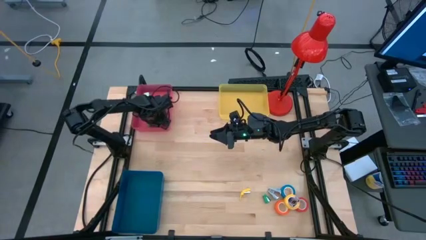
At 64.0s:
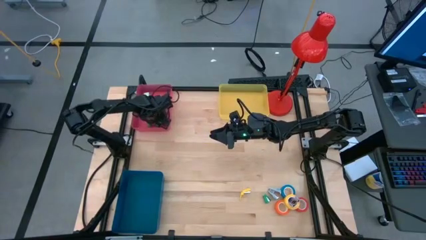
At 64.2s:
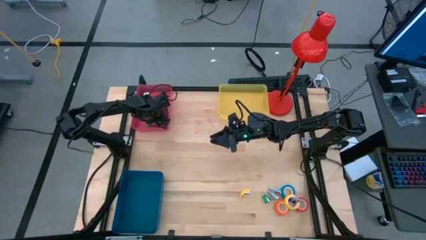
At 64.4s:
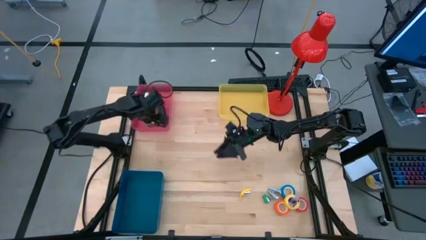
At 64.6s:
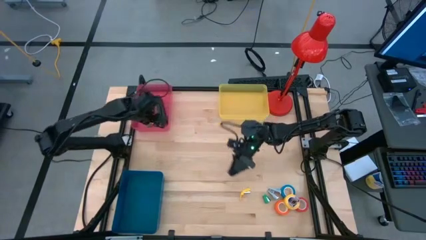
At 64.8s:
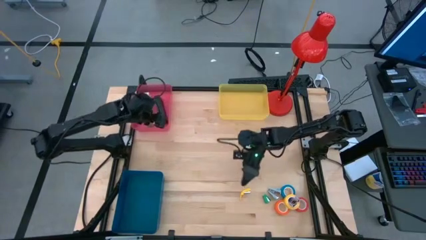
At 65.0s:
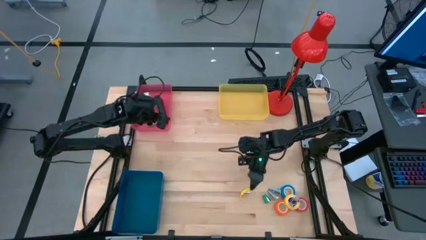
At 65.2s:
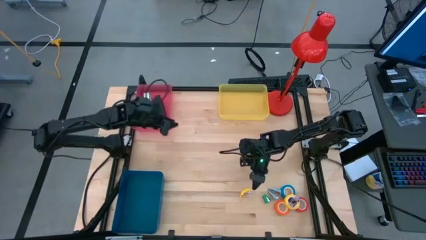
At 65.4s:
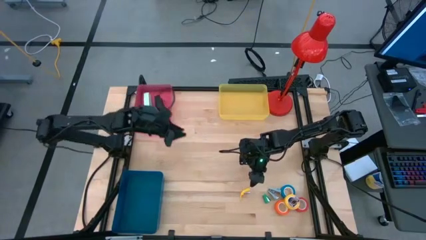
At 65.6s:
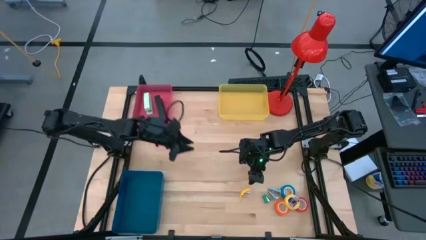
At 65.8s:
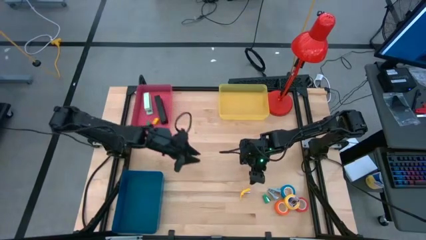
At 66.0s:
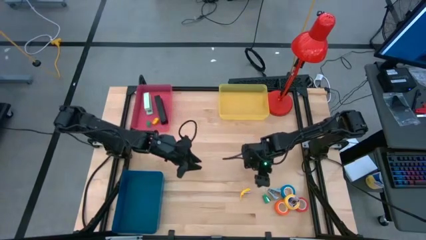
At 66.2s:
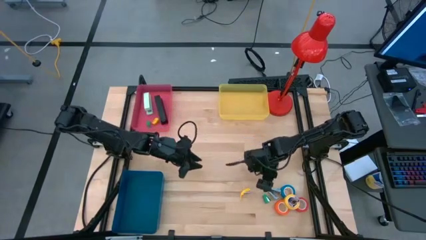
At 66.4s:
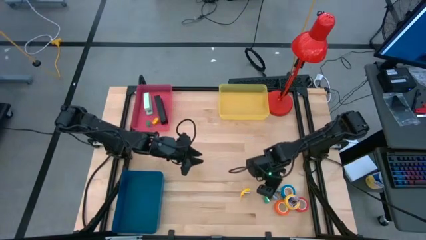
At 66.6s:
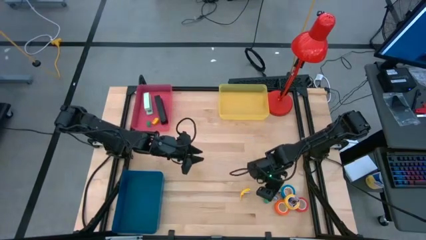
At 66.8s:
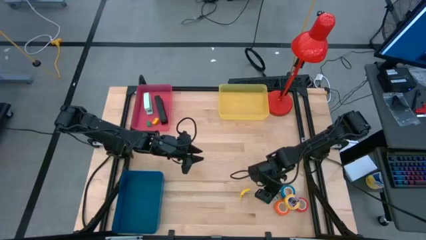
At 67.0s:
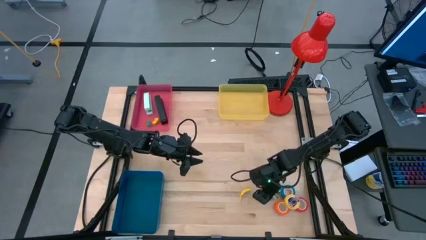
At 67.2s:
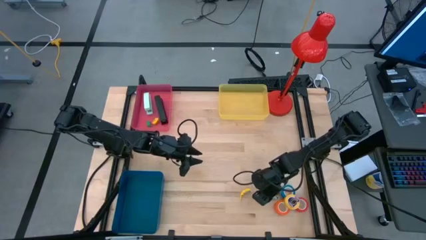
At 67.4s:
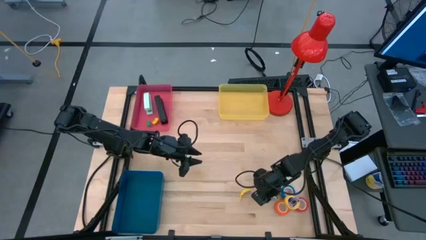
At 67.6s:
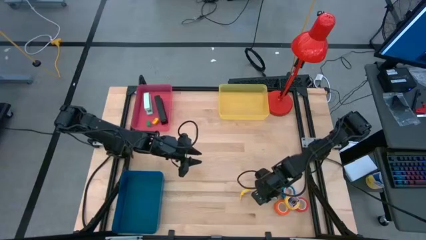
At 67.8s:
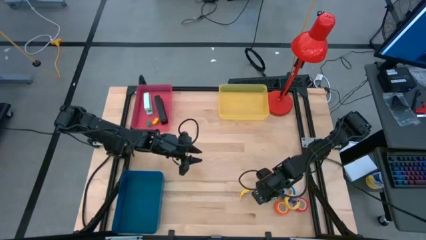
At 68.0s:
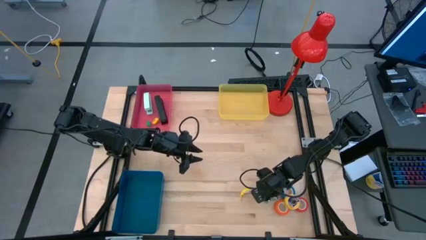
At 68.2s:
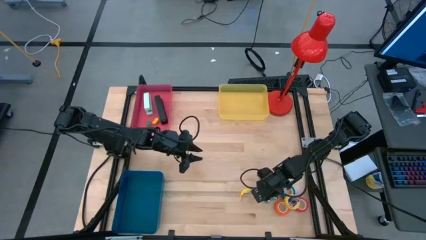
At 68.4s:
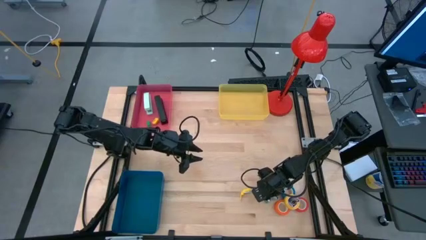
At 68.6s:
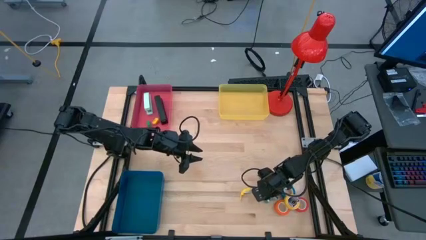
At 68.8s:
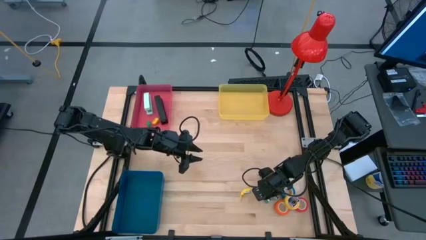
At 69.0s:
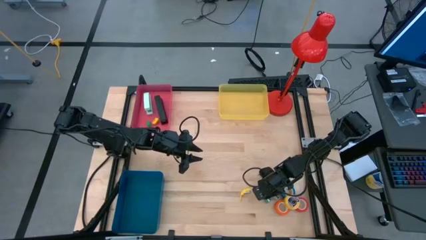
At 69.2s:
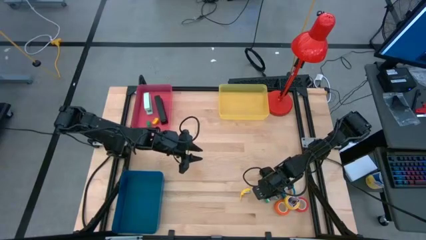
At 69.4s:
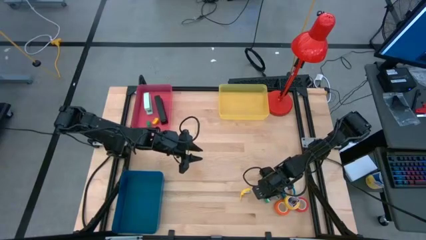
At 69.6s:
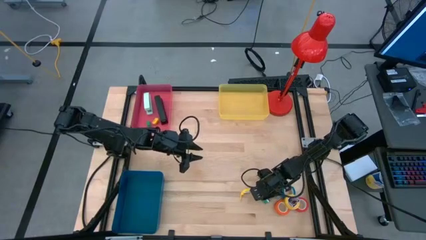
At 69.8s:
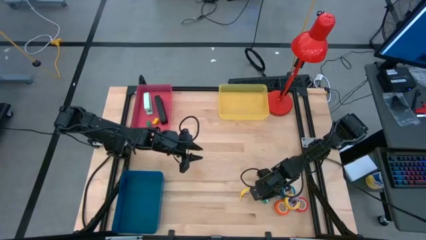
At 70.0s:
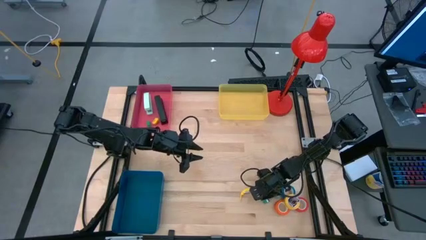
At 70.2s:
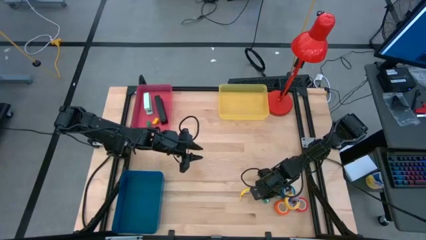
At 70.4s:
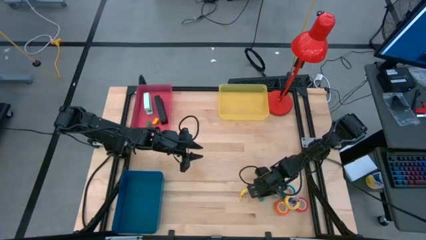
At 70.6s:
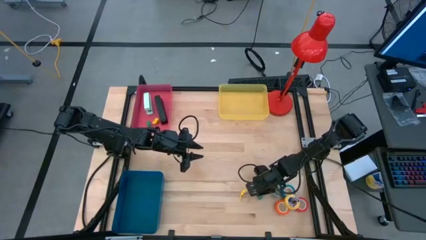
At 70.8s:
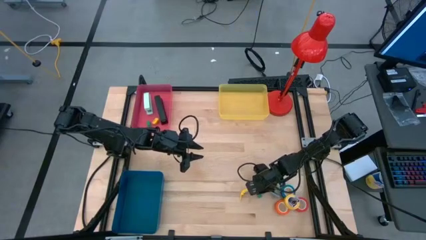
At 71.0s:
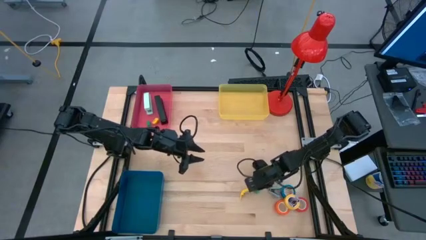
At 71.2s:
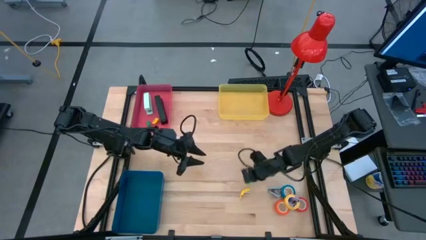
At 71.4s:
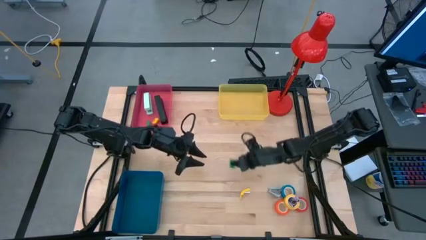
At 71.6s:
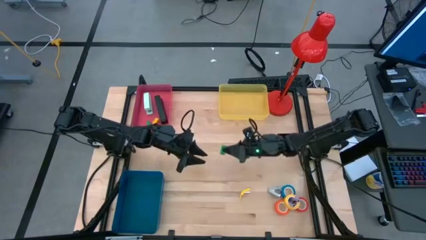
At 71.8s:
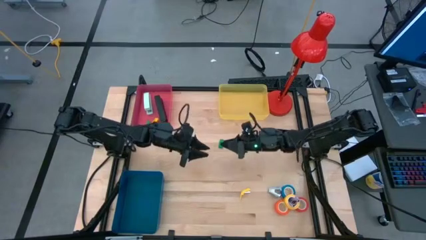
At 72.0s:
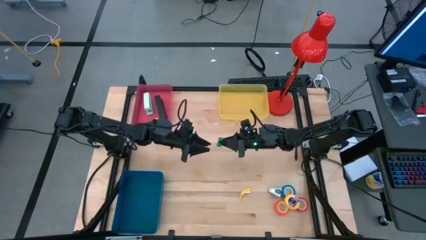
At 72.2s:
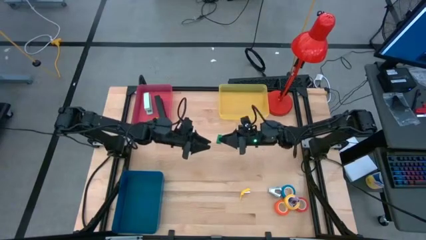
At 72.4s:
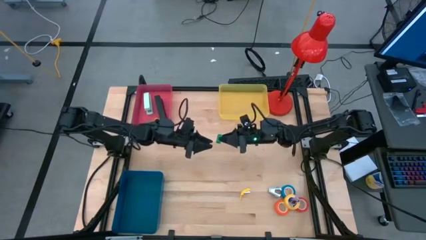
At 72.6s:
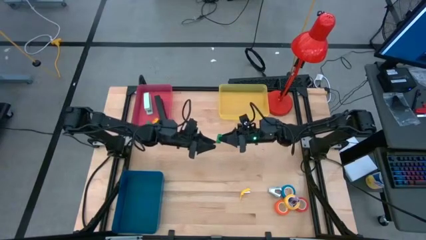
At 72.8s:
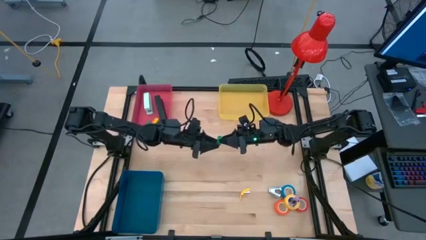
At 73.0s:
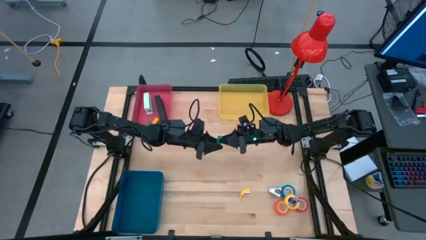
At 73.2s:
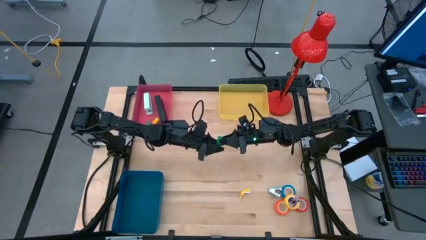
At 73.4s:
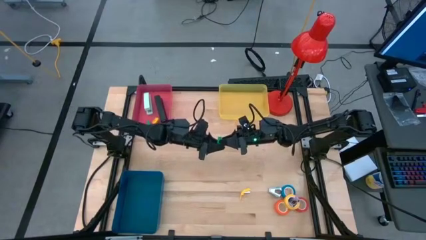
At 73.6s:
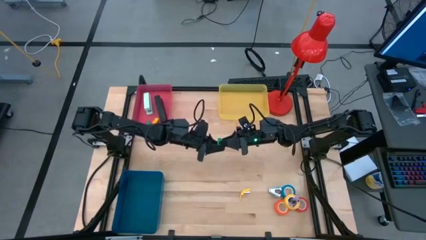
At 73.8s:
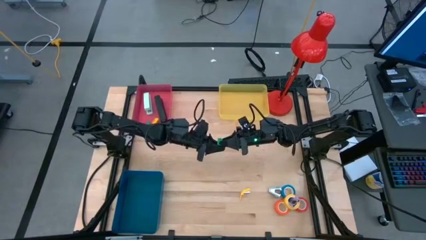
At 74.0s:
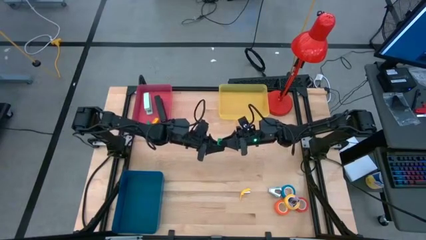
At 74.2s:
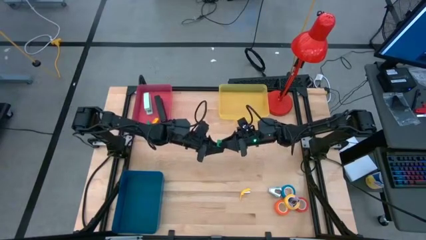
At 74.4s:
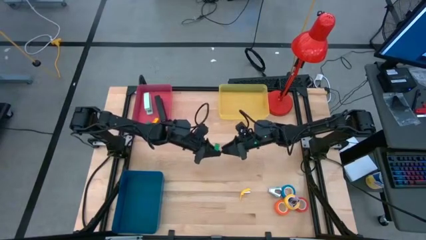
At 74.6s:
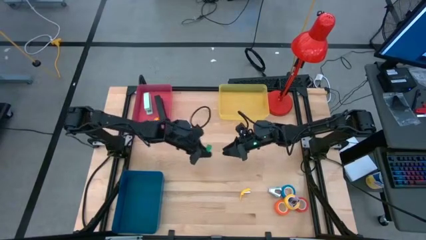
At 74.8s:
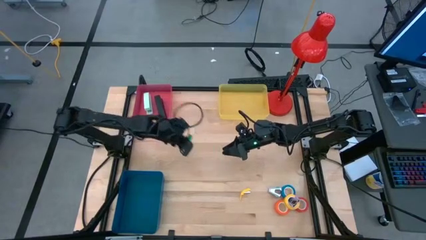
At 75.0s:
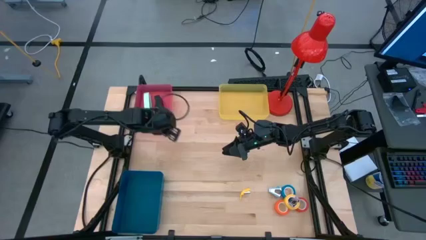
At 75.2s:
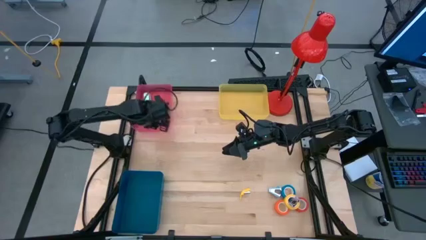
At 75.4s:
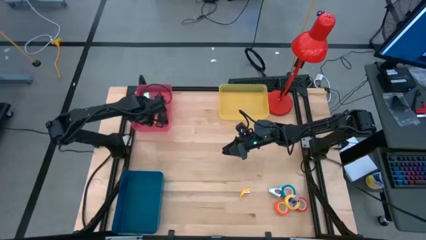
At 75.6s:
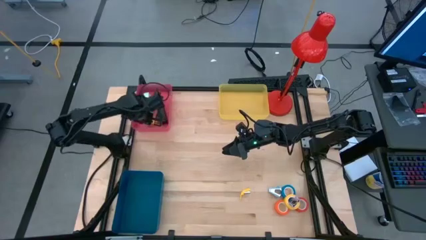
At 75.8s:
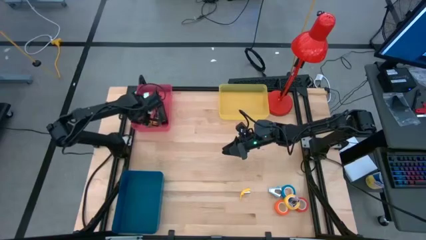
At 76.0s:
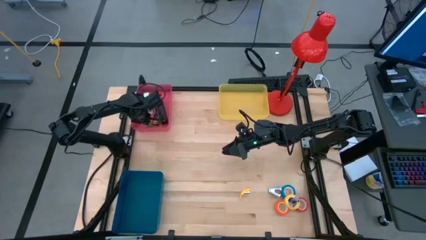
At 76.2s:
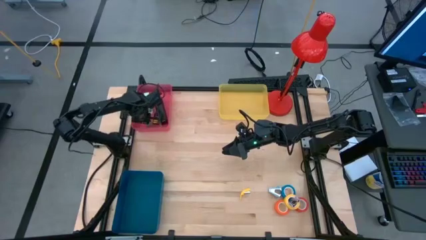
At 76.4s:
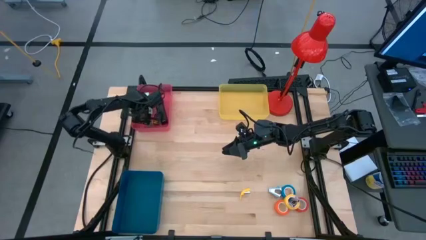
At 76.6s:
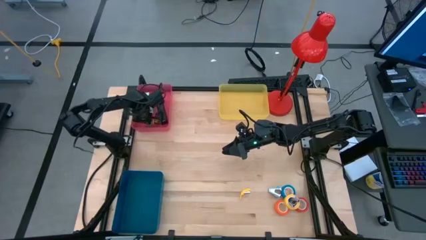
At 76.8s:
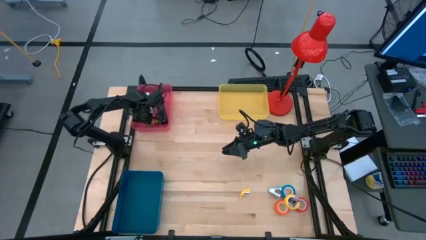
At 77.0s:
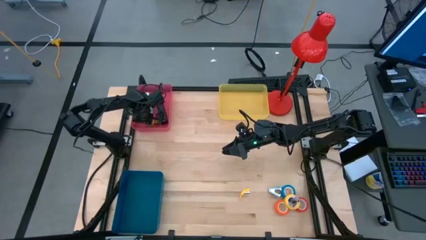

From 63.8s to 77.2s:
Task: Pick and place Stapler, Stapler remover, tape
Put the green stapler into the red bin
